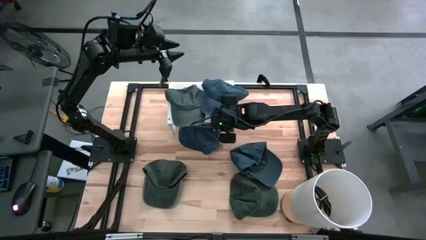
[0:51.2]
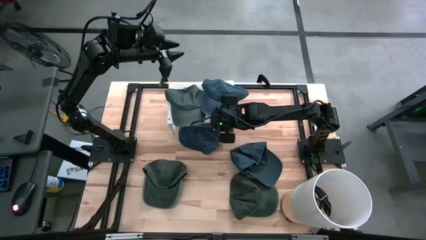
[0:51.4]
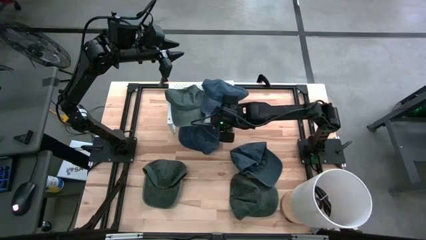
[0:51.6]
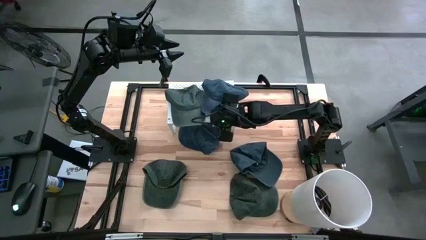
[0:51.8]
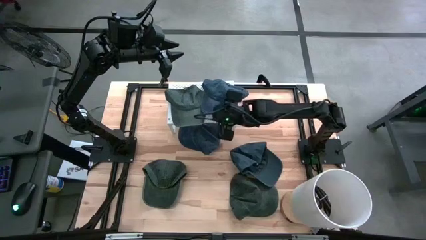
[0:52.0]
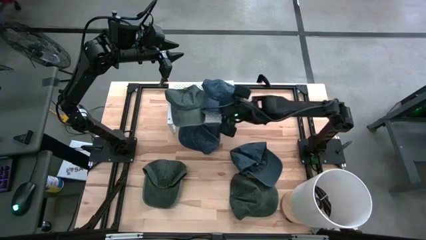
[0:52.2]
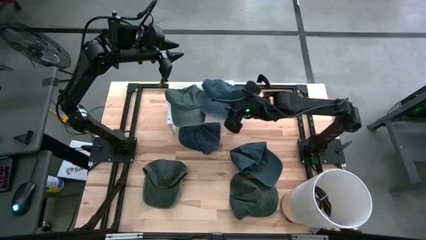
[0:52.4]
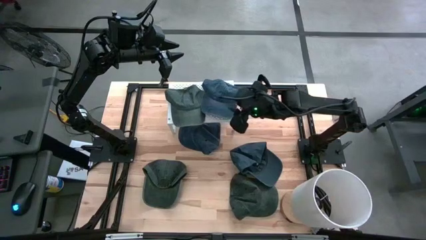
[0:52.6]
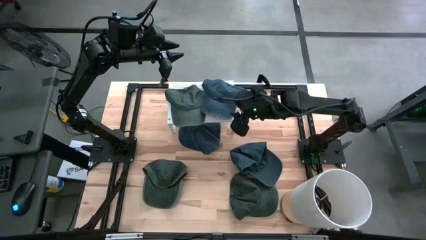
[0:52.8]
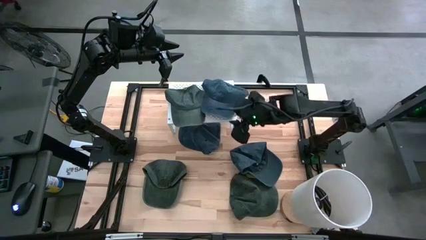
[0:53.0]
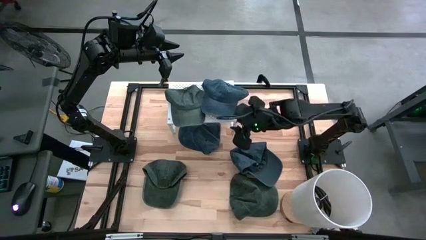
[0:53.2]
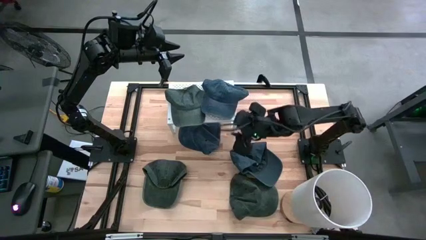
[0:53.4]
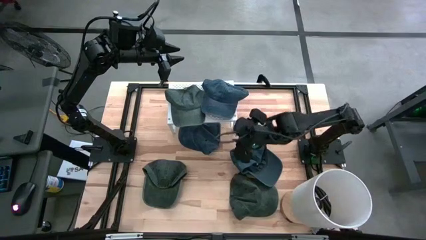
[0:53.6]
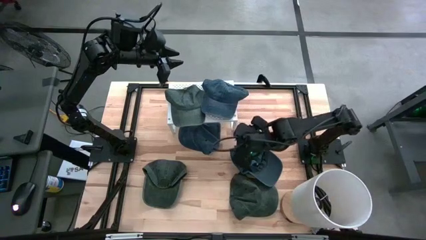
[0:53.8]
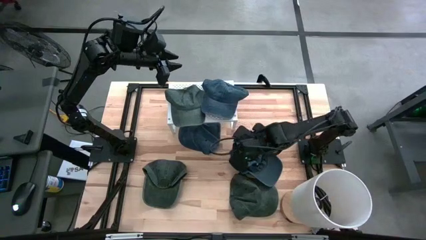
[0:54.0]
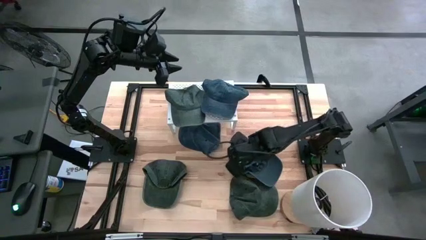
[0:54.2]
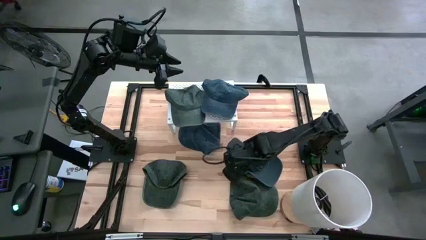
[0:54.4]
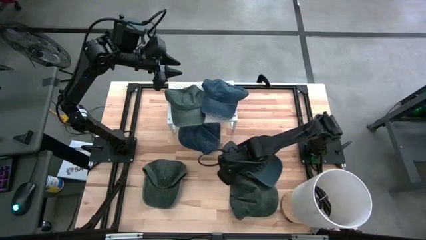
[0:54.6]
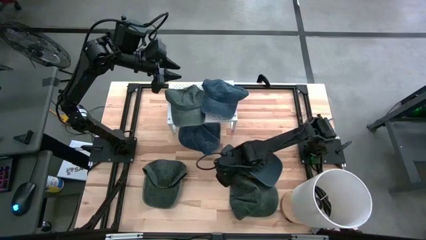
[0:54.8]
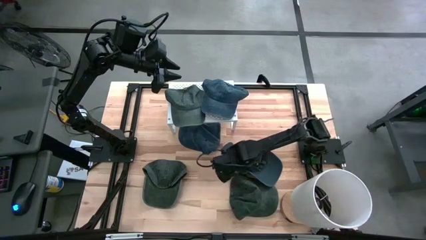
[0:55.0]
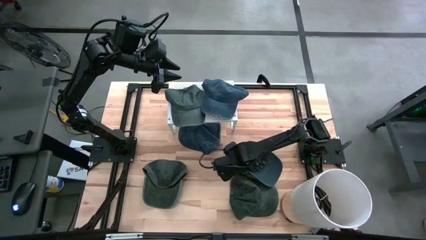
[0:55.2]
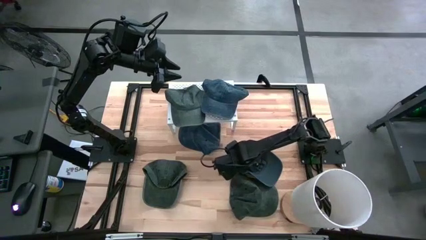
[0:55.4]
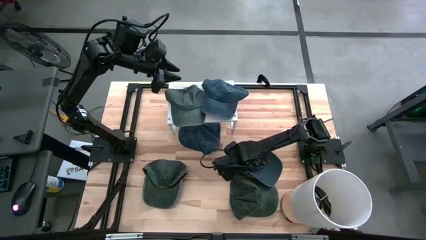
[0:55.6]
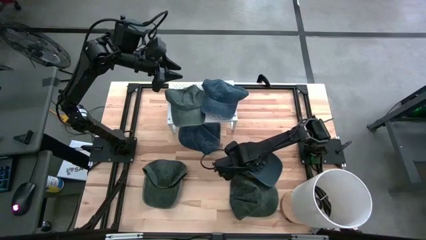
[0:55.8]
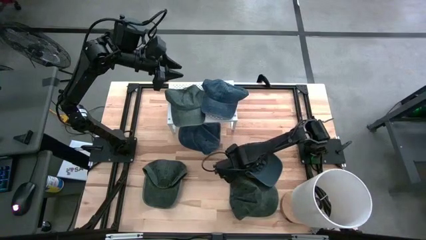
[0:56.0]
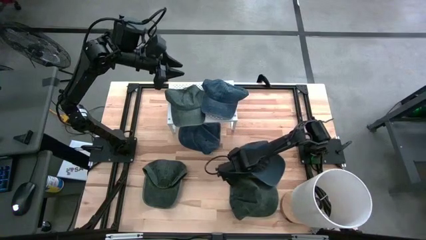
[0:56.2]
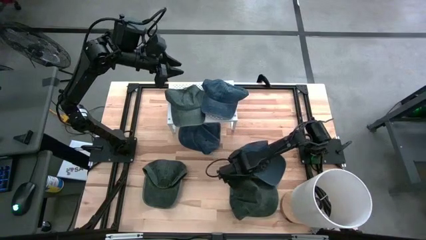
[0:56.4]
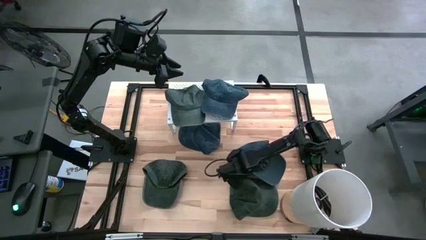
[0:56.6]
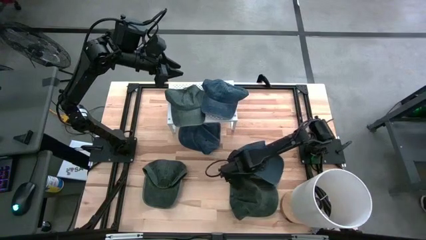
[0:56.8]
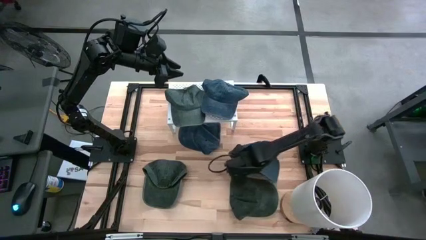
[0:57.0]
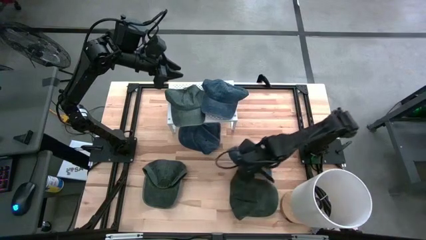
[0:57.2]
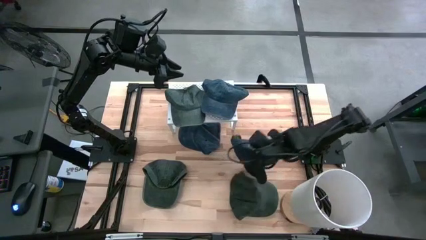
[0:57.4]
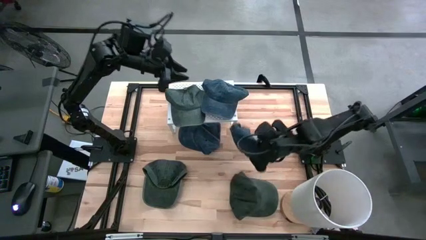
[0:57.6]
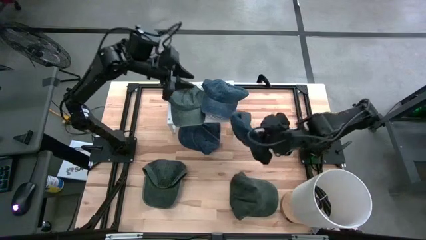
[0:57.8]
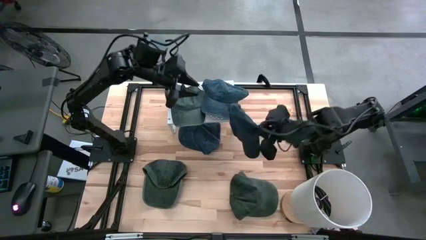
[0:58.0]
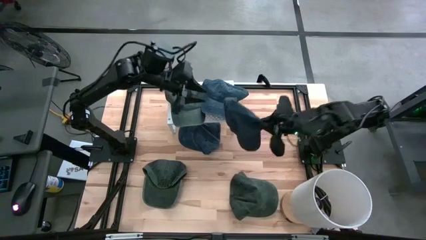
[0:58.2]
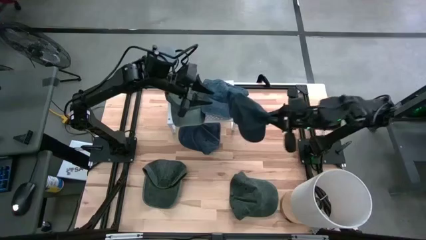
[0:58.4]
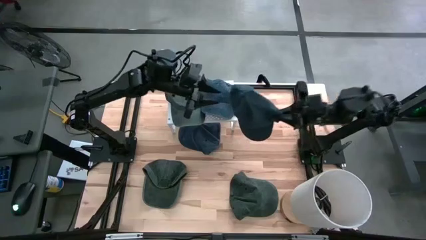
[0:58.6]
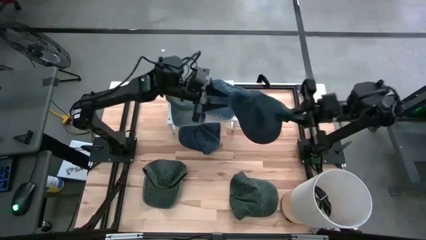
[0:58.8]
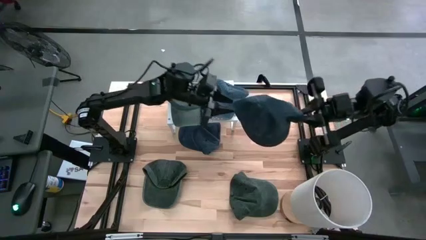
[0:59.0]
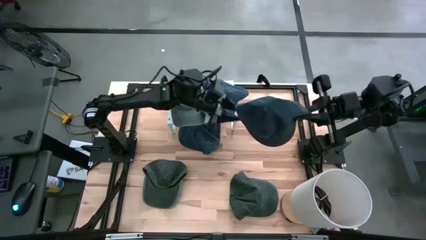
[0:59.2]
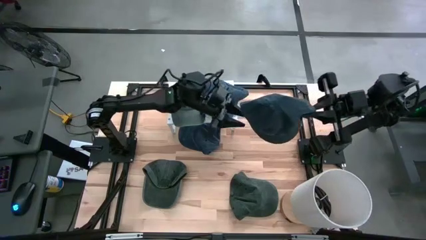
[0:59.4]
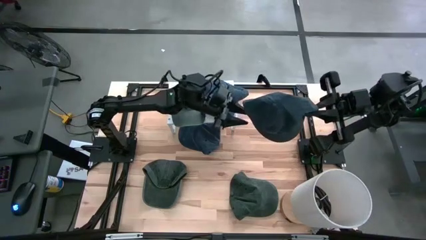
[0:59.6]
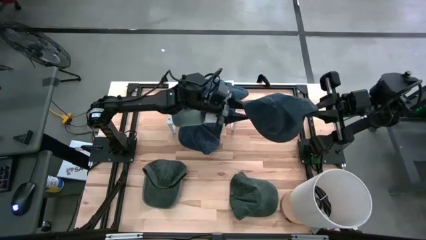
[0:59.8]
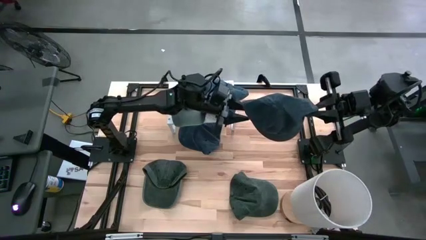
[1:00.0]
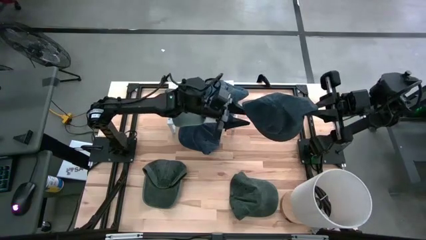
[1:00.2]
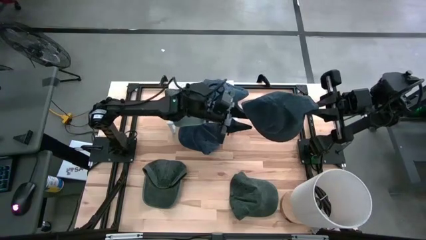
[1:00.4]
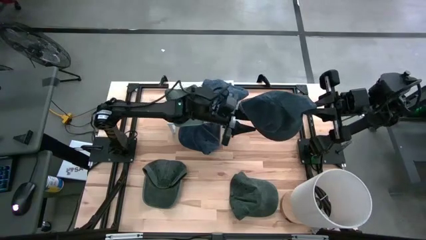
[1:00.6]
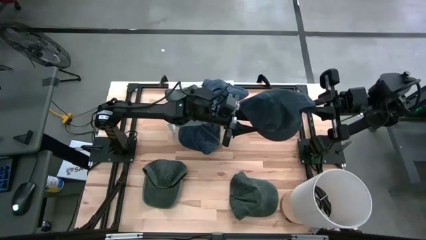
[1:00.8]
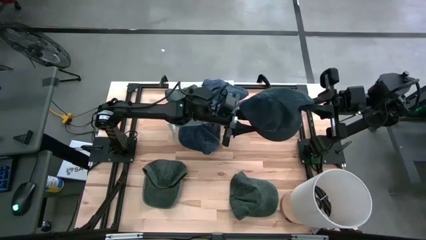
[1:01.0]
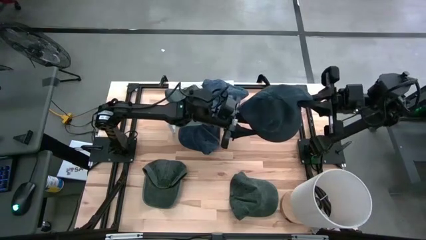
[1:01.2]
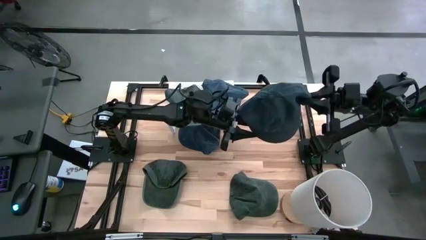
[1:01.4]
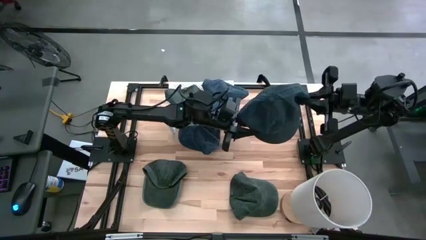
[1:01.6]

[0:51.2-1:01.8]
Task: Pick & Place hat
Stack the right blue cap on the blue cap on the shelf

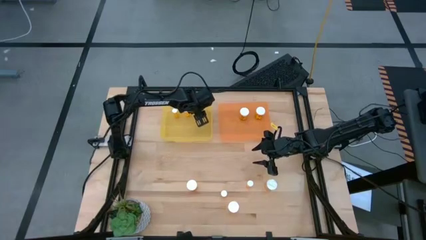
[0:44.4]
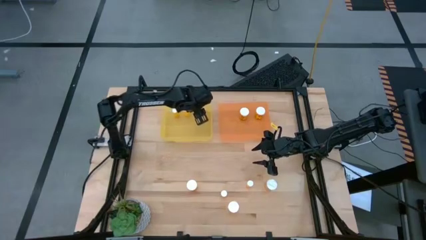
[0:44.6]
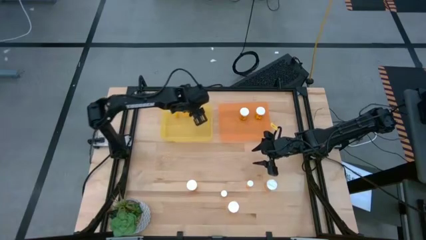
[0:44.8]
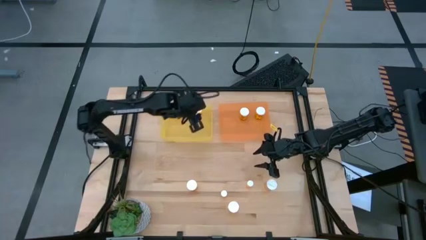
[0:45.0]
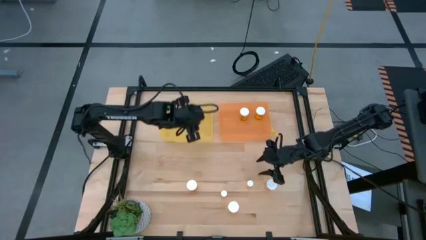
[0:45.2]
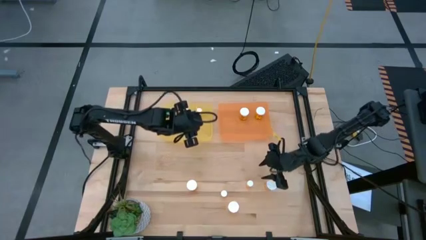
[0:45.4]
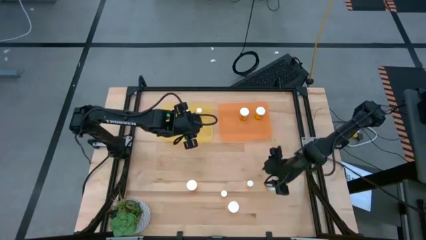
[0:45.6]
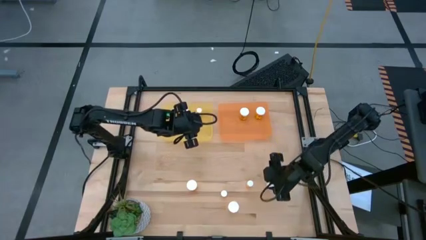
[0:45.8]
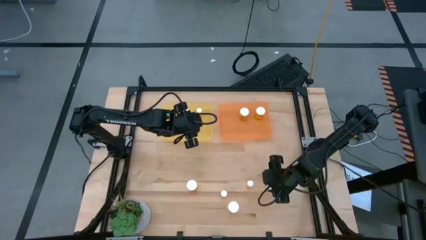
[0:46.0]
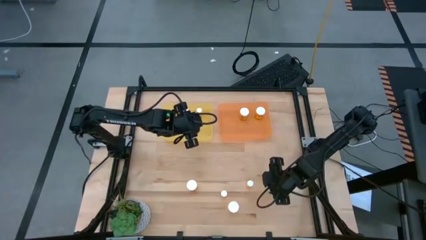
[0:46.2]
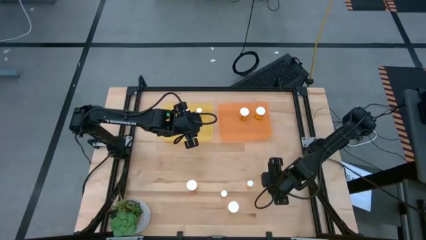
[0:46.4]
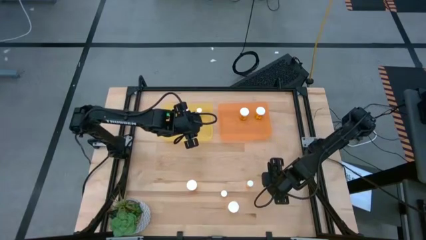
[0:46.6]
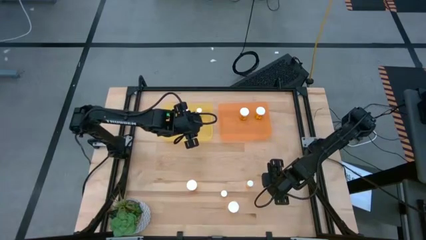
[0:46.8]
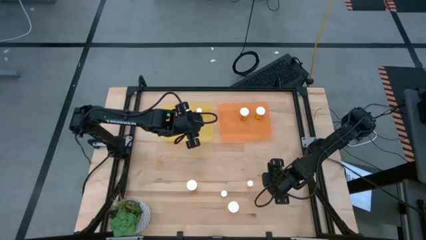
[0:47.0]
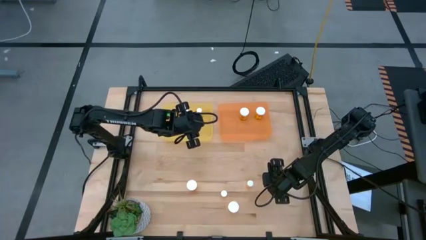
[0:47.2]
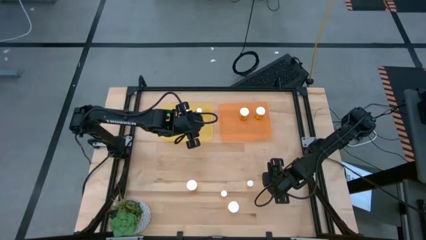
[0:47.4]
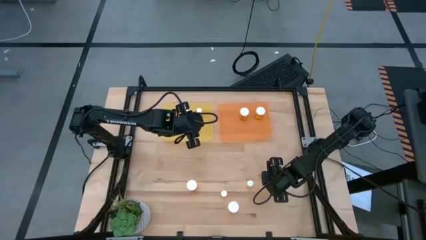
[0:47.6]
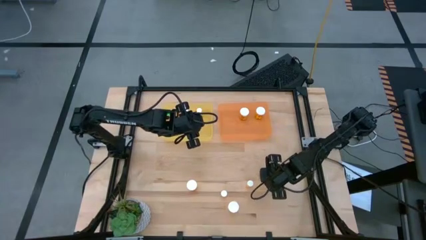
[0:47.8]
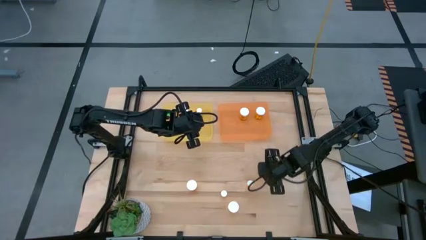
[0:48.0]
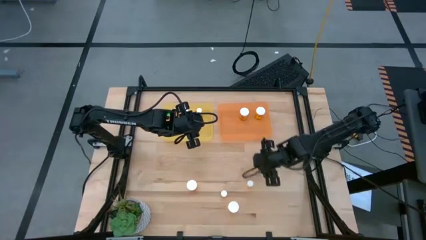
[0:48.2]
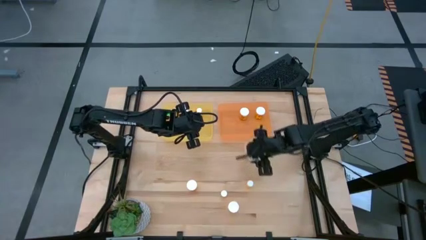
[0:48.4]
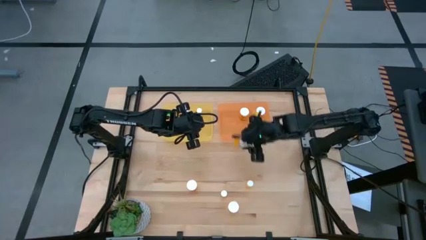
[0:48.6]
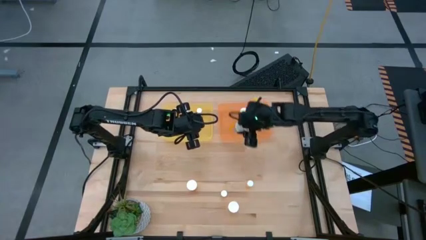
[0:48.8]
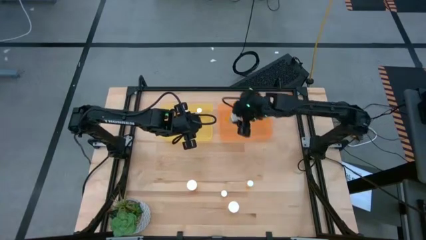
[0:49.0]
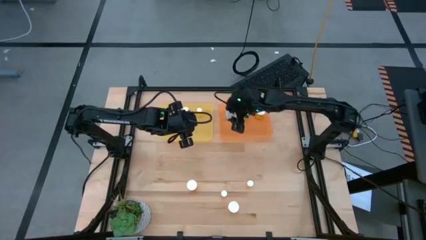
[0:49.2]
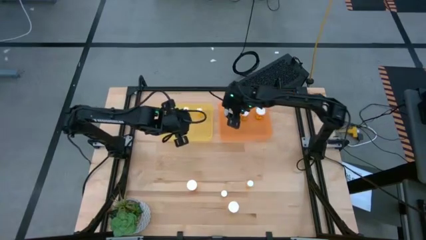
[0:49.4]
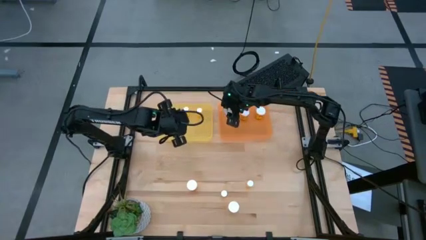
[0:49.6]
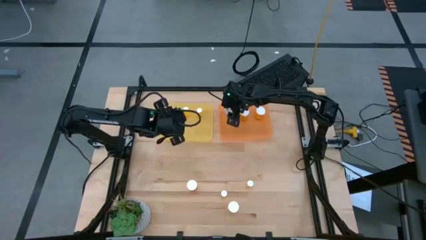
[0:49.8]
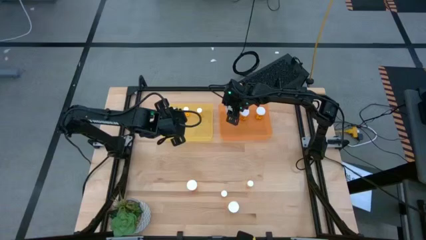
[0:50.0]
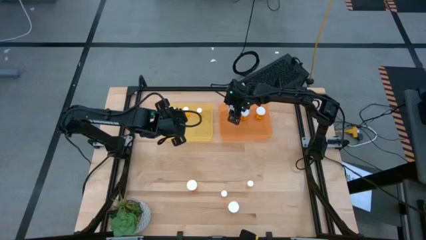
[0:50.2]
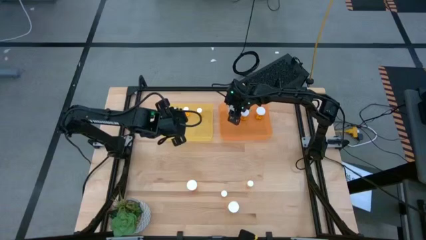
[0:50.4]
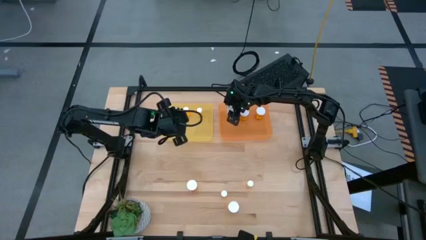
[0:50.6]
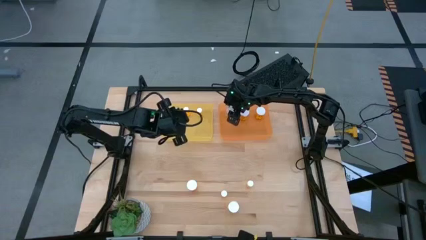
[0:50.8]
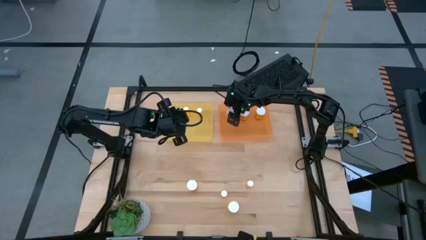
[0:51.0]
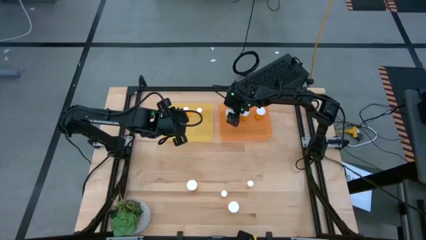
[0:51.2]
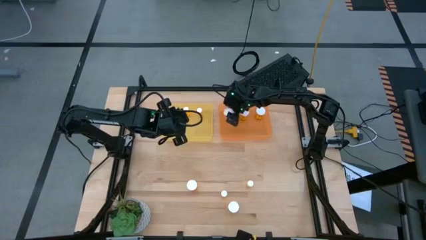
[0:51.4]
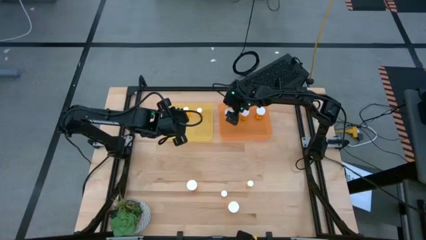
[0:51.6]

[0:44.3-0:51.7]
Task: Pick and place medicine bottles into bin by pill shape (circle, oval)
Put the big orange pill bottle into the orange bin
